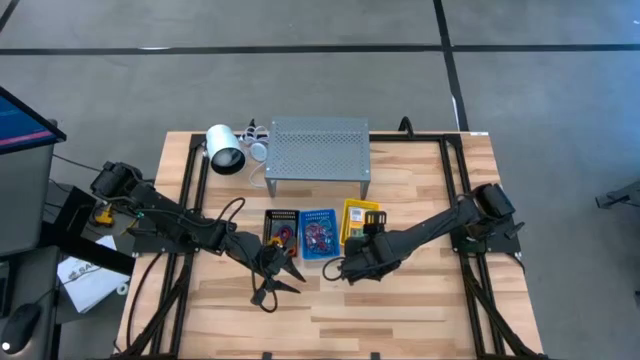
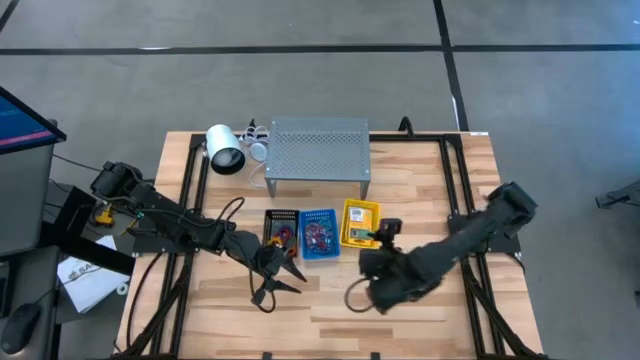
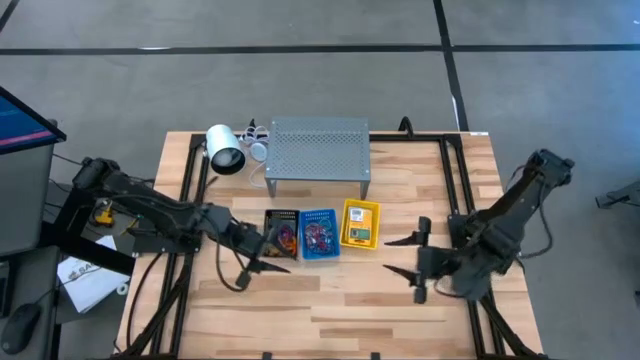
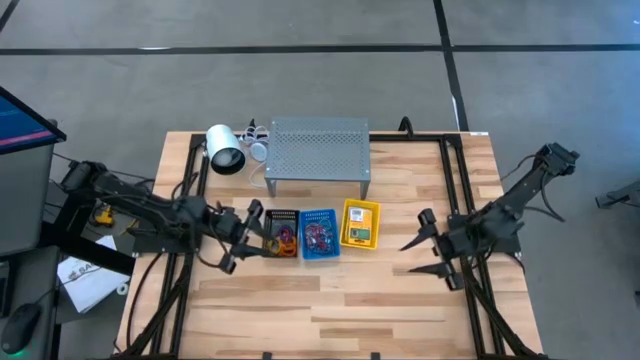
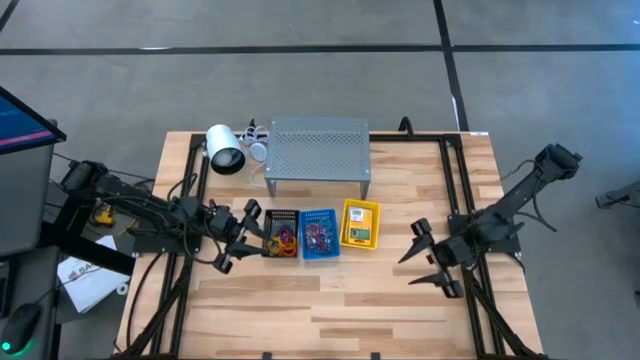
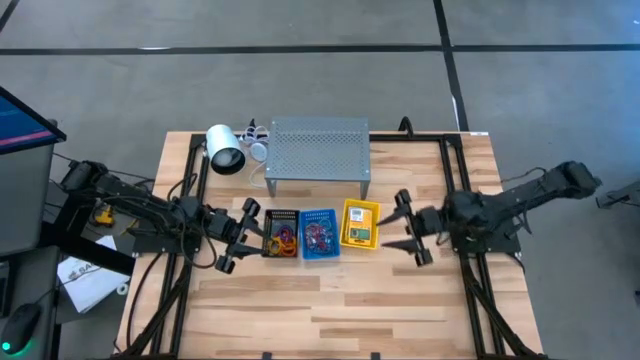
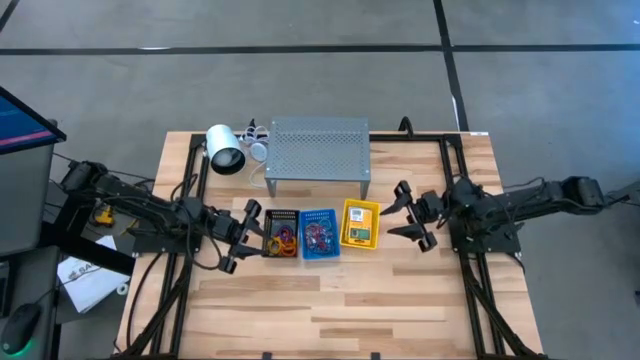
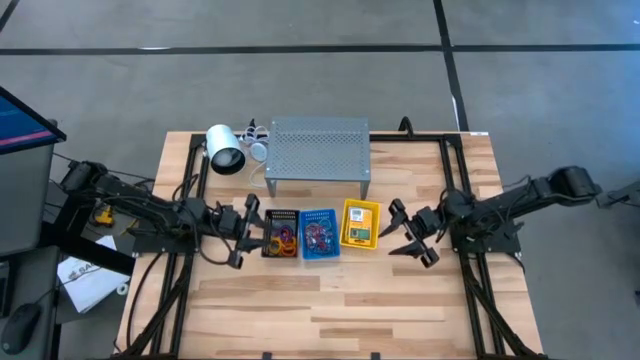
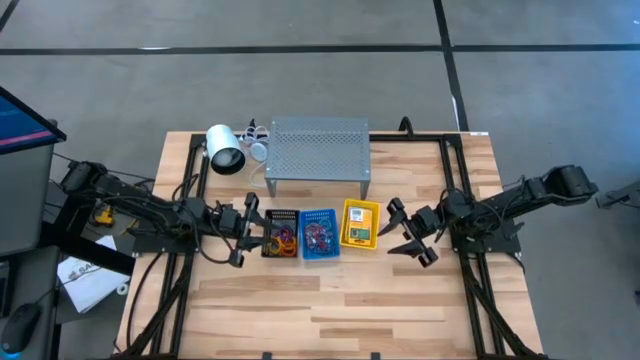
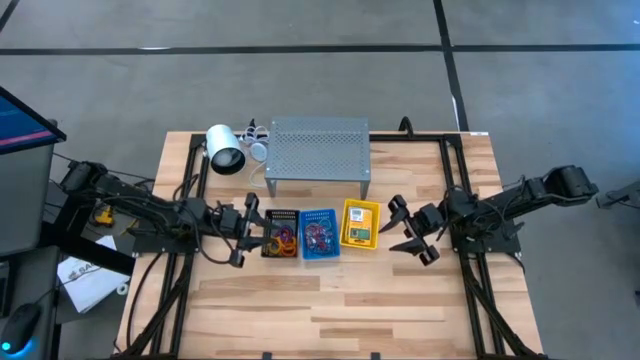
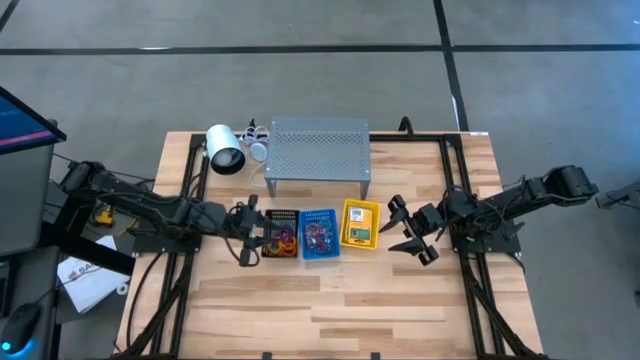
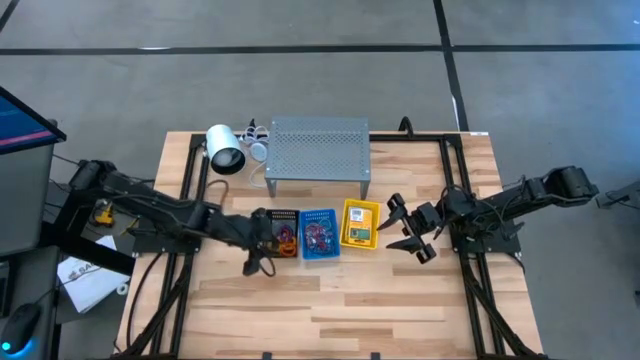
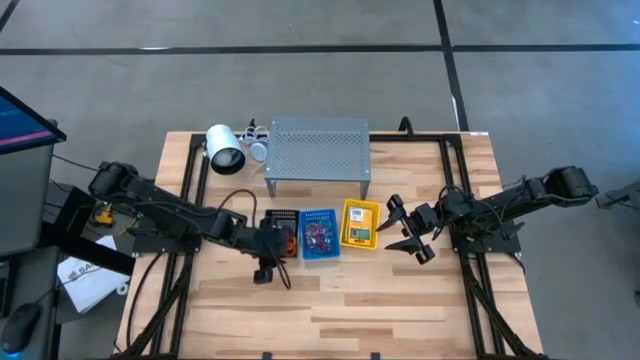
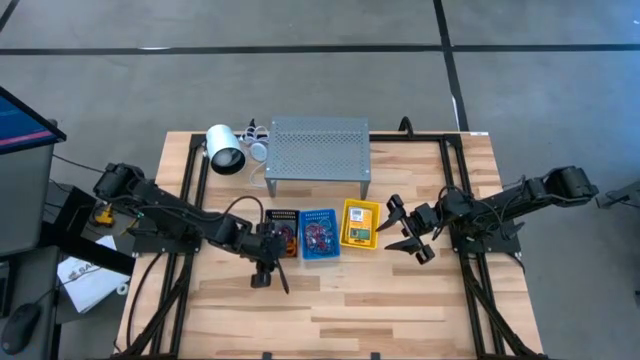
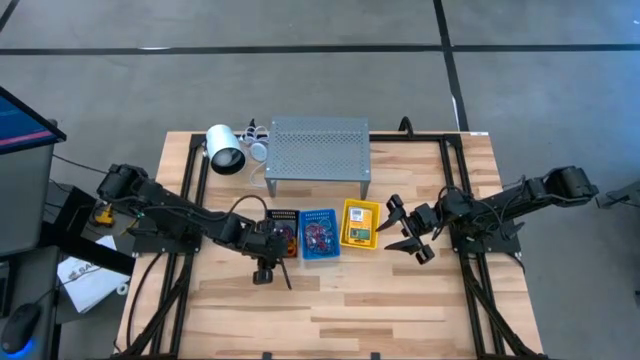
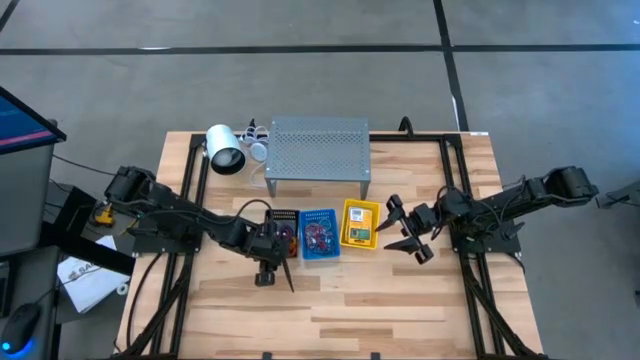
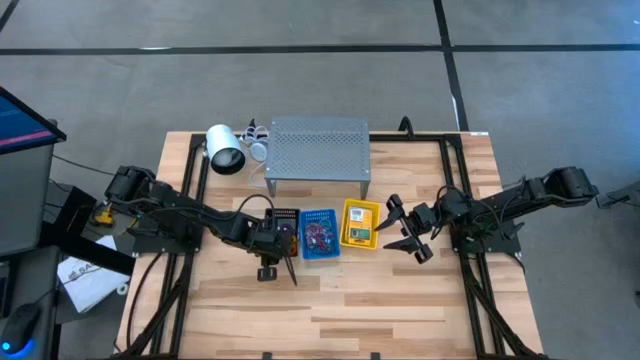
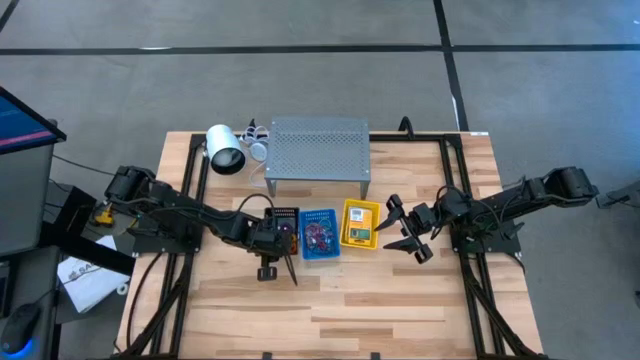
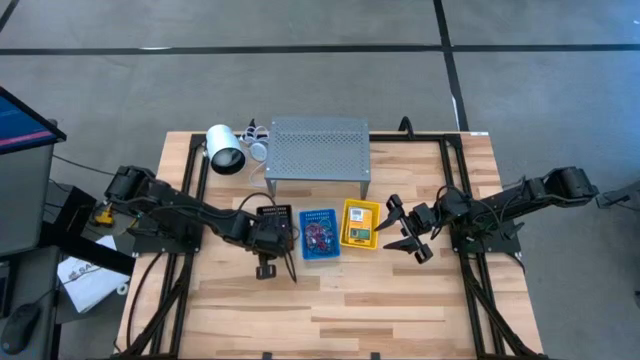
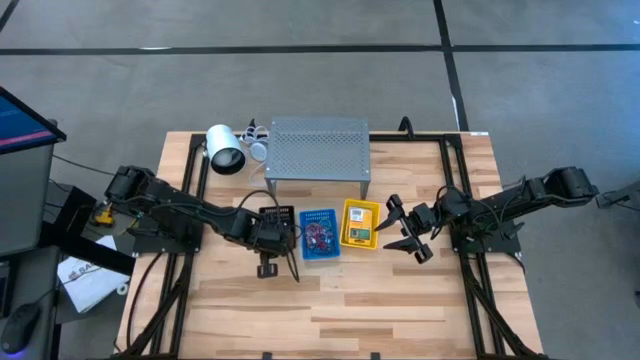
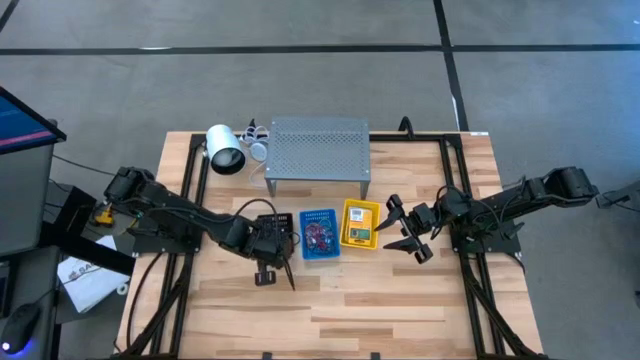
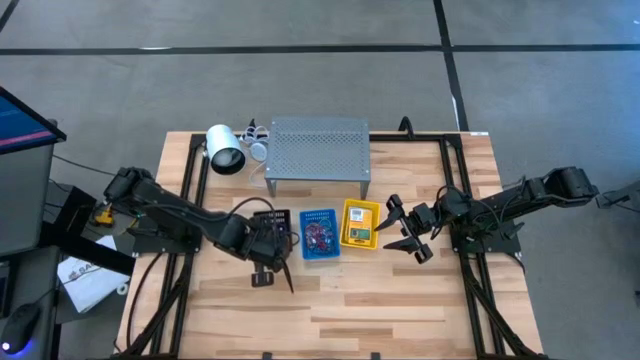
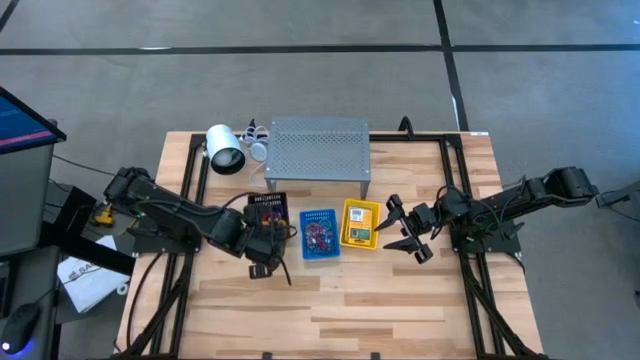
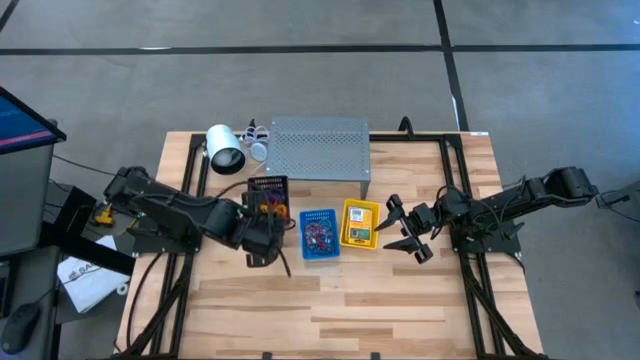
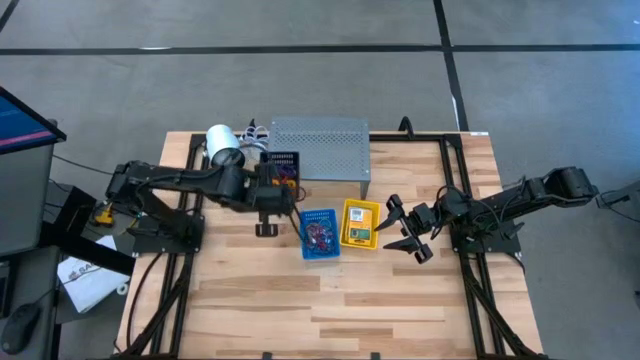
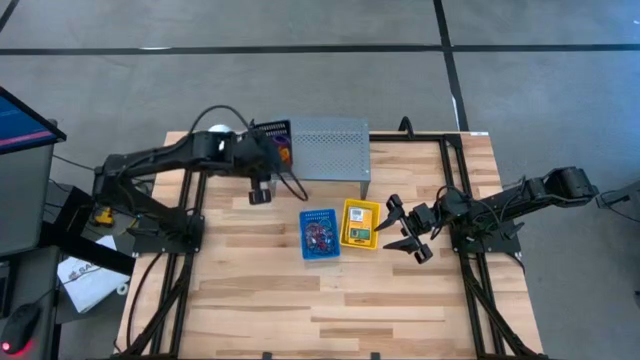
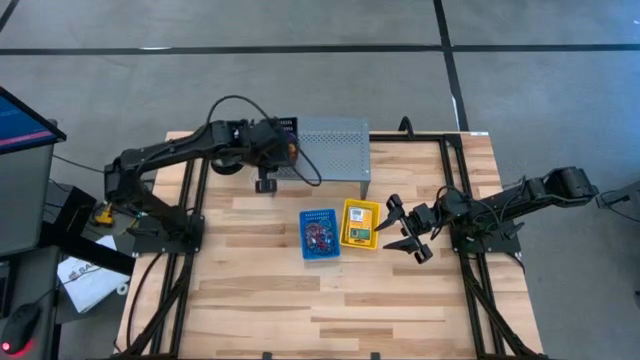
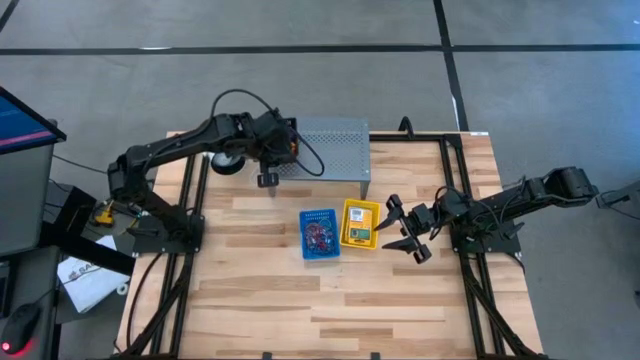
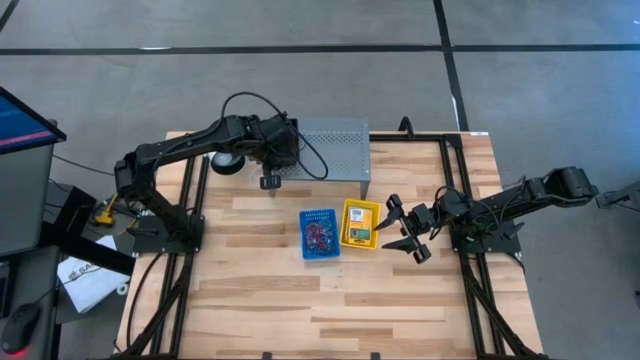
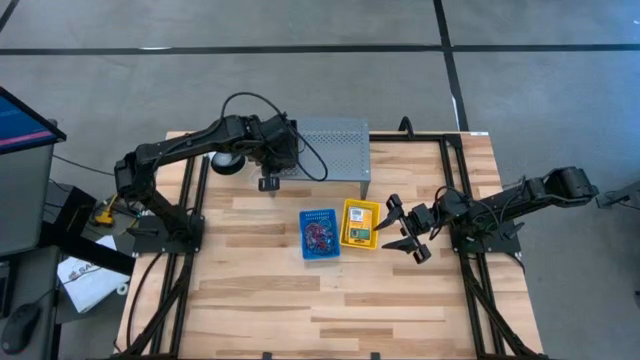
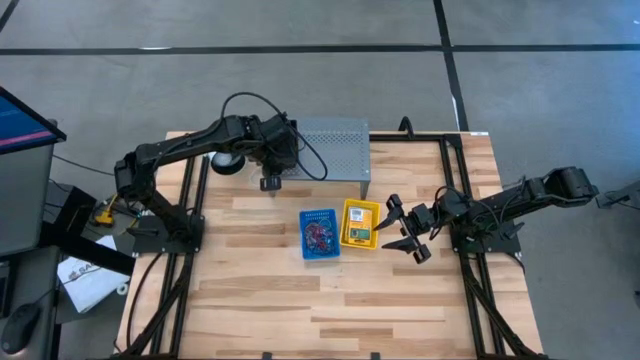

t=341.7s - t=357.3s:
Task: Pick & Place Office Desk Supplies
Put the black basket on the shelf

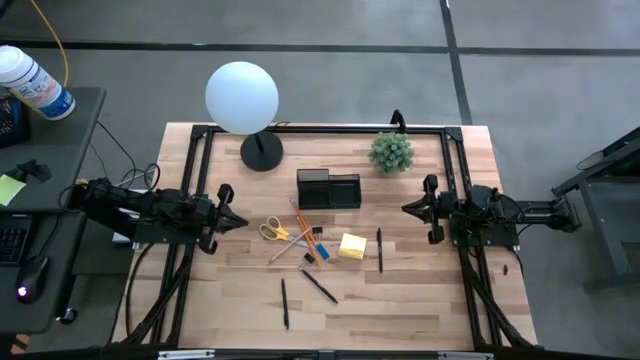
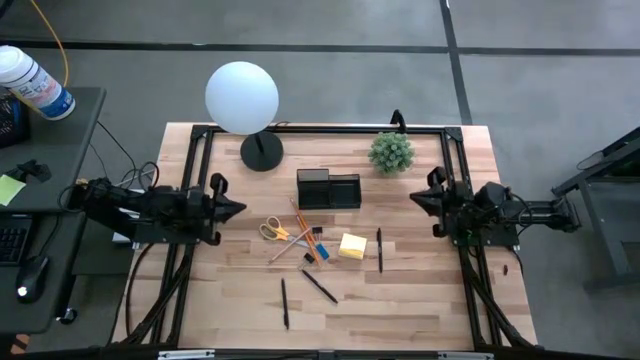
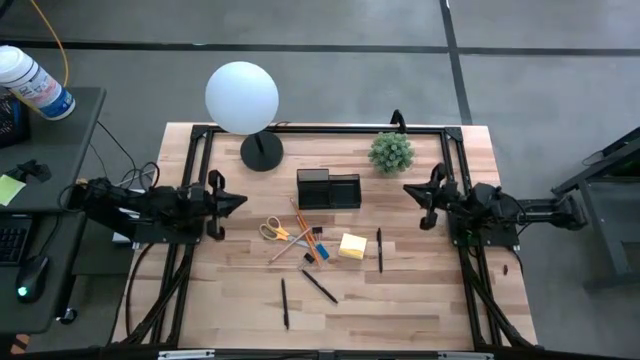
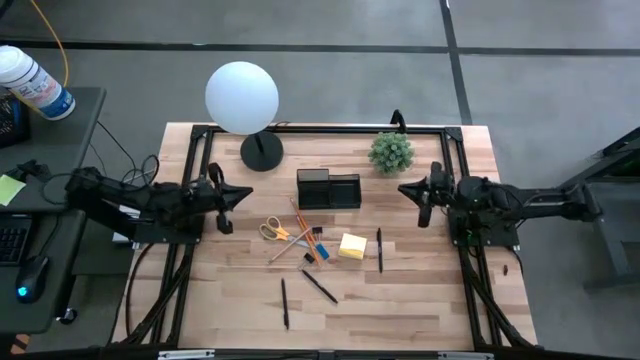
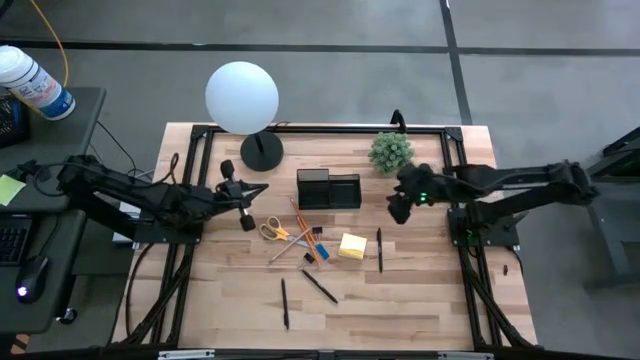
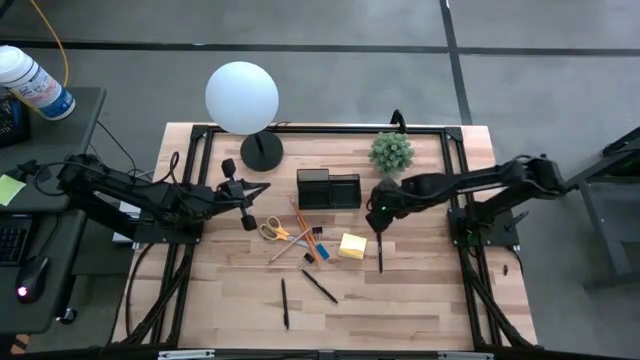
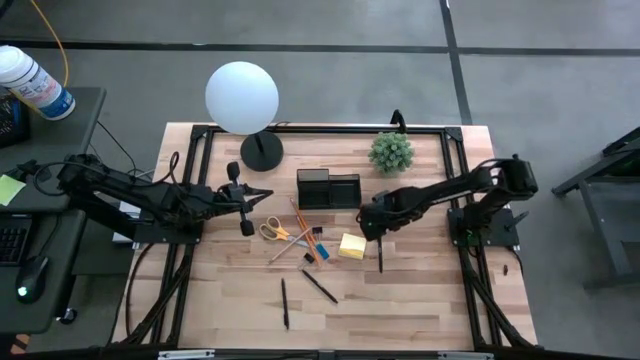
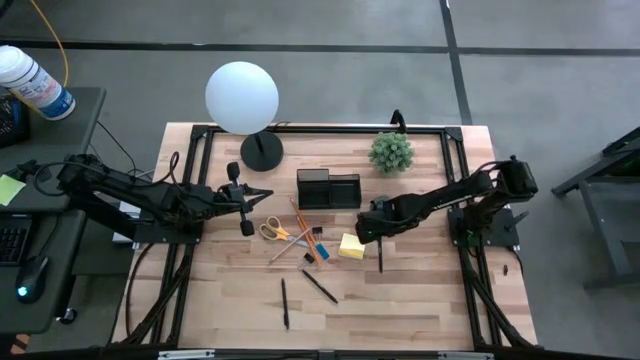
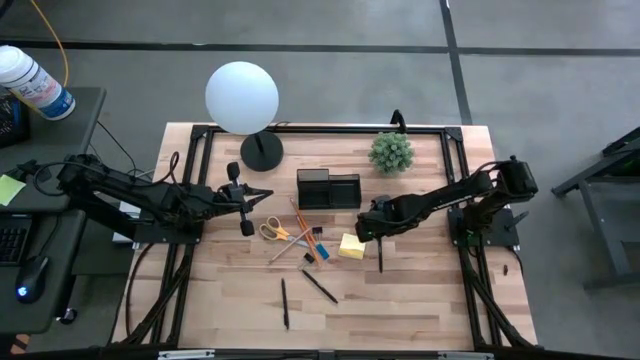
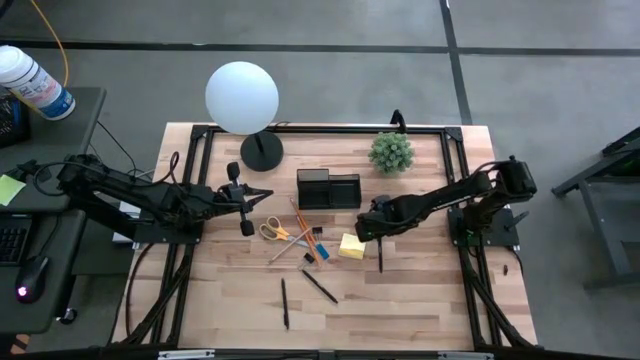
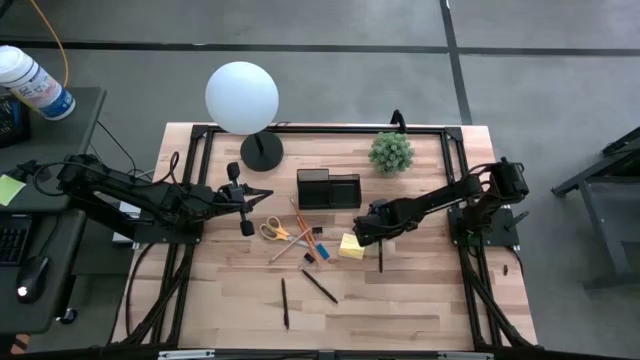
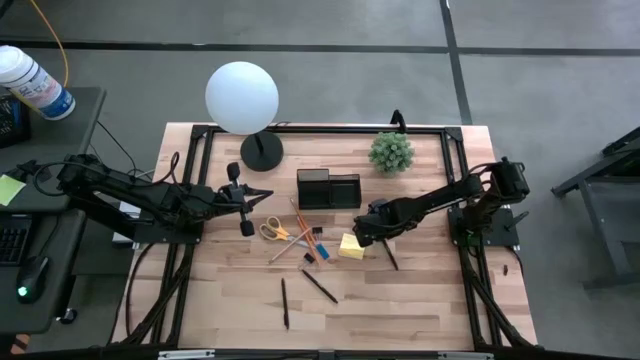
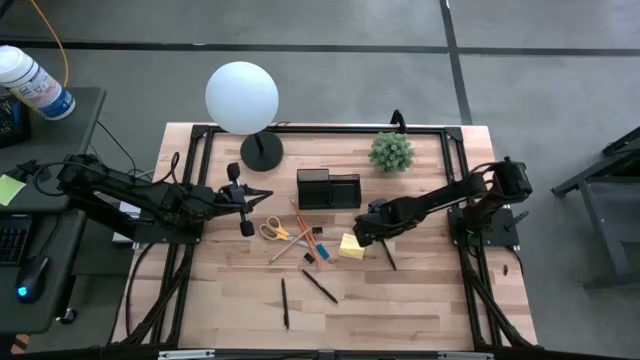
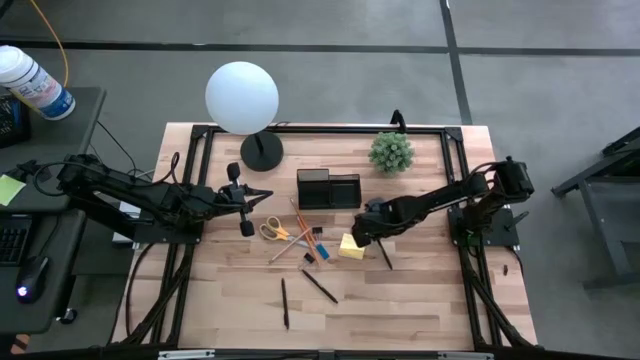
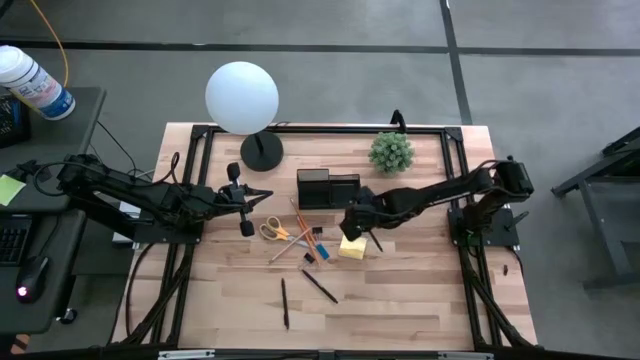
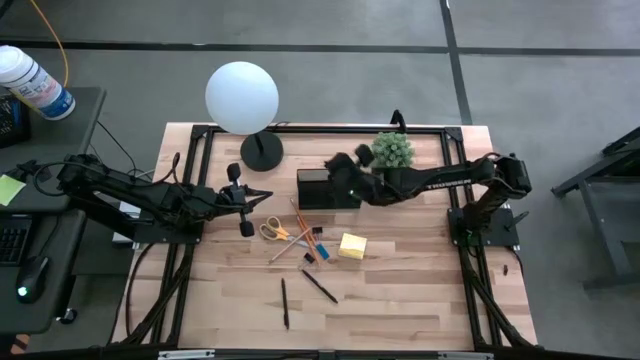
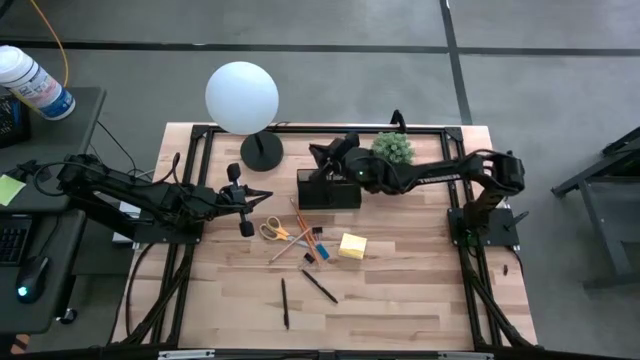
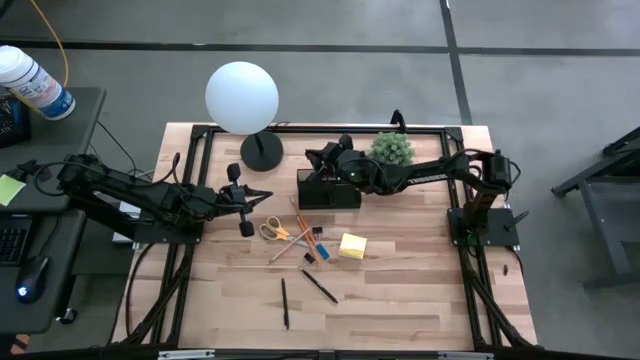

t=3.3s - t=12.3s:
Task: Pick and place office supplies into organizer
Put the top black pen into the black organizer
